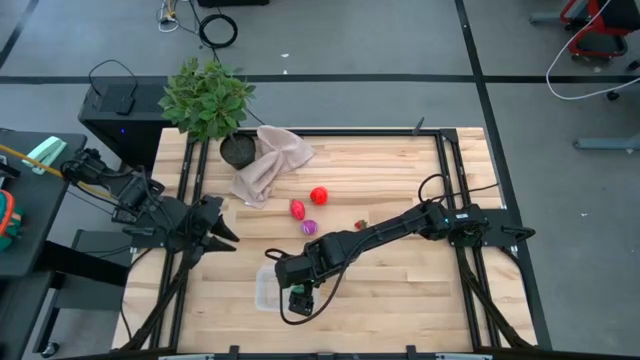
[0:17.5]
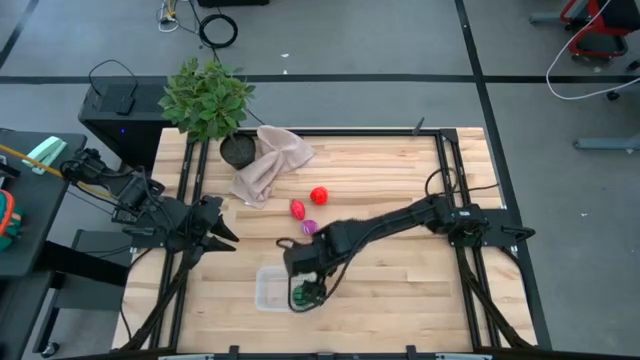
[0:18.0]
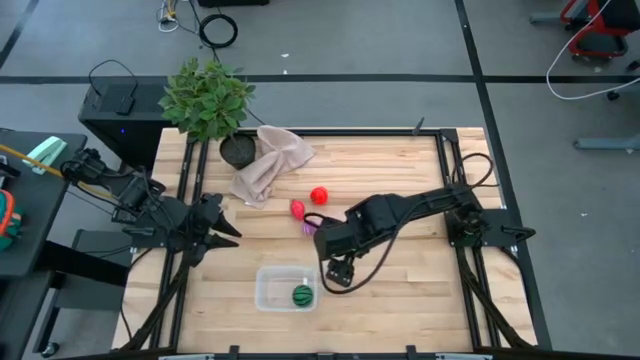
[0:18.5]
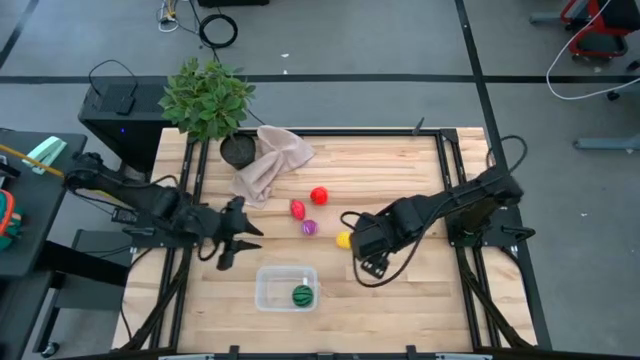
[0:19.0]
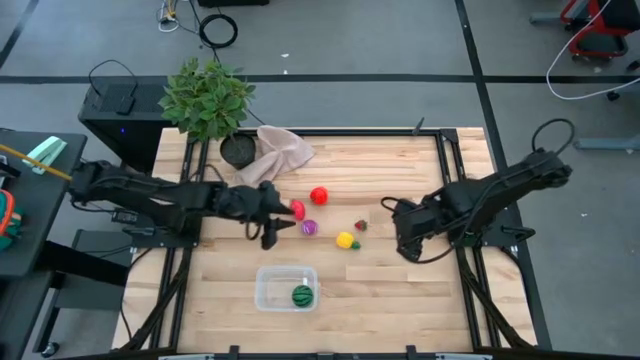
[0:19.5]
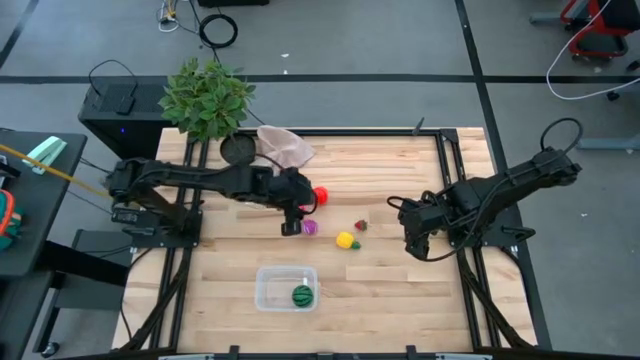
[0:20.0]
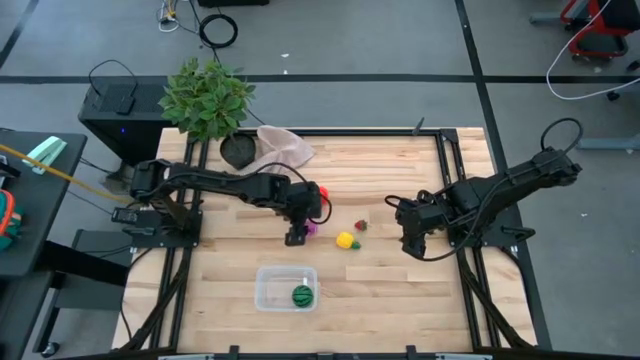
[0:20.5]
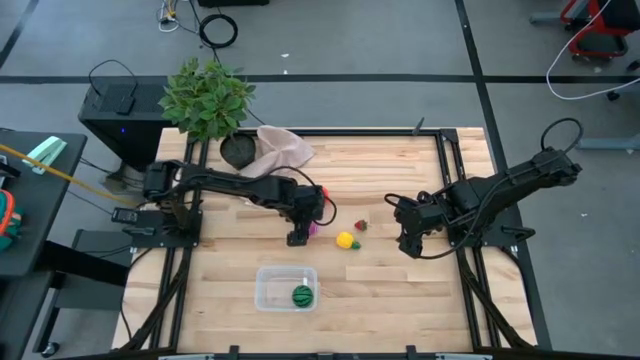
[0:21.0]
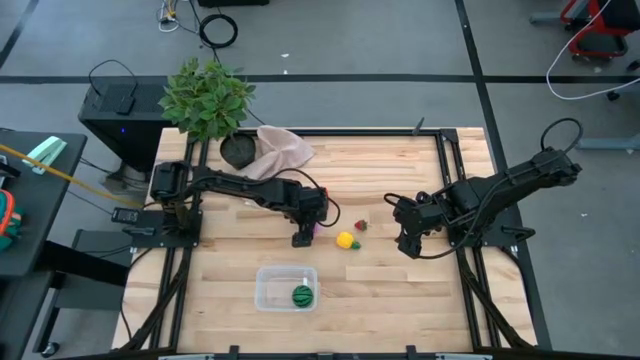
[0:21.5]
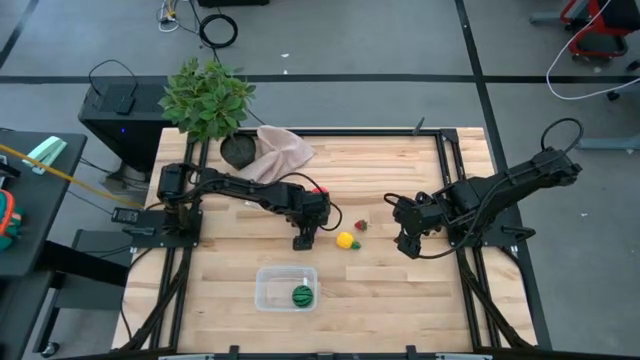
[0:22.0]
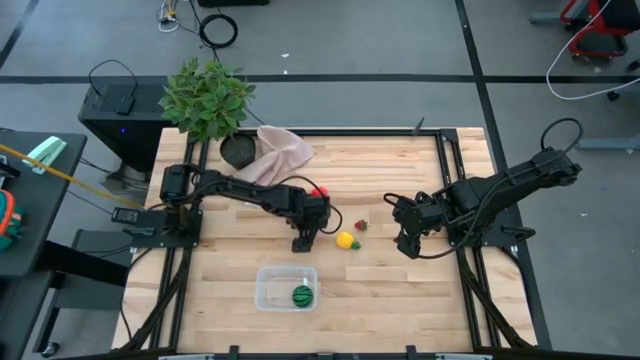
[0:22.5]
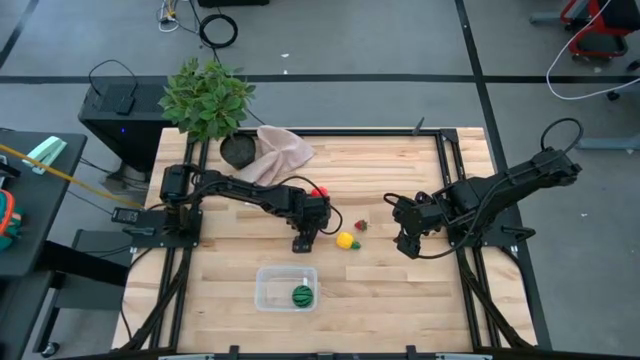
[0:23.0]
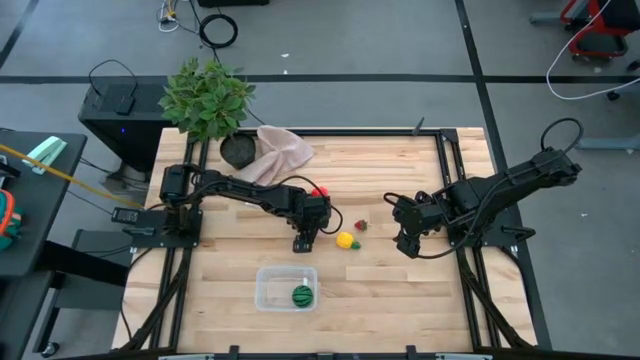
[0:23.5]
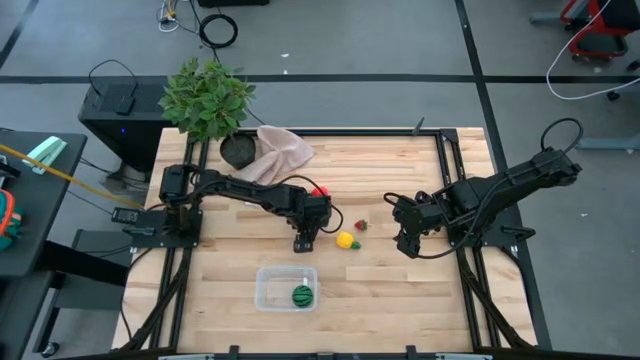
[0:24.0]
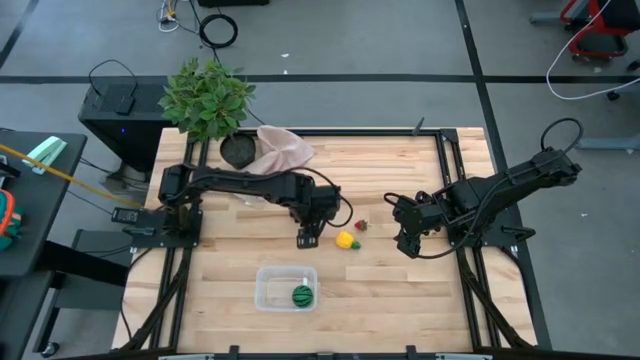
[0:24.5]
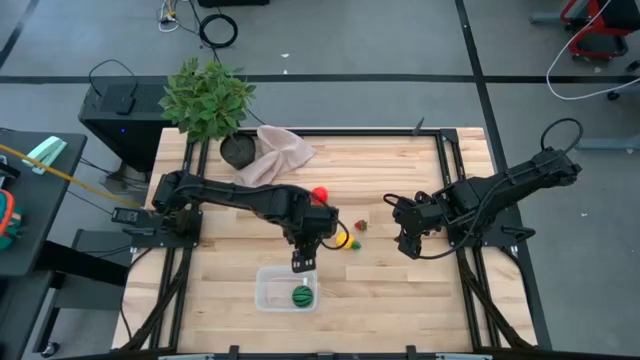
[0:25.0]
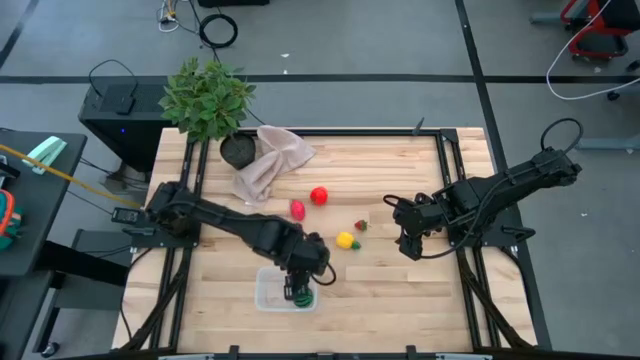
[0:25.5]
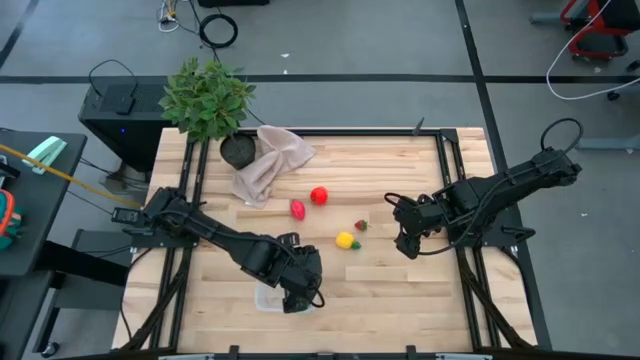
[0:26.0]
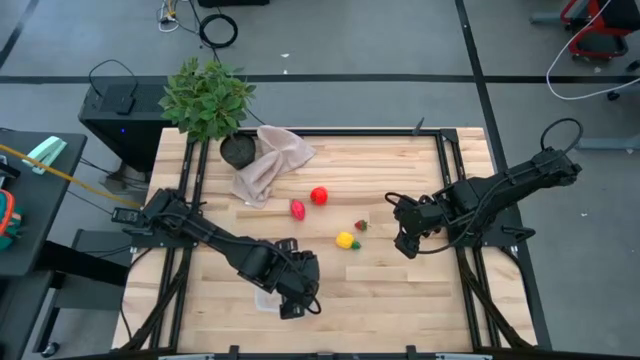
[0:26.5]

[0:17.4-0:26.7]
Task: Pick and placing Produce into tupperware
Put the onion into the transparent bin

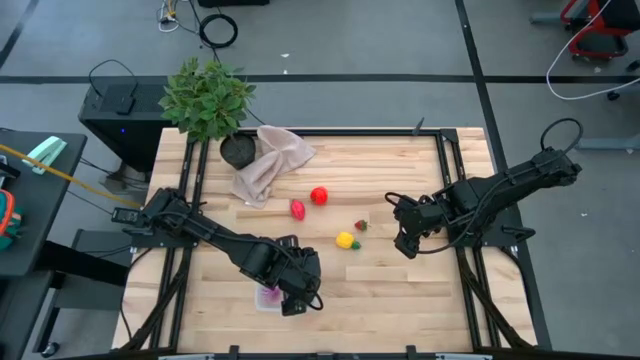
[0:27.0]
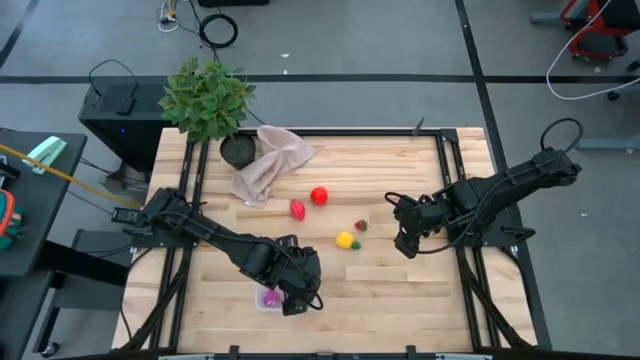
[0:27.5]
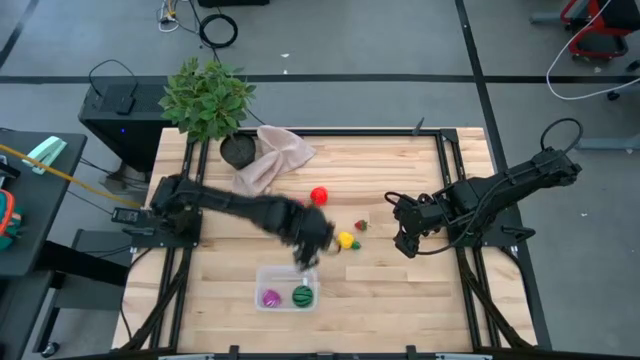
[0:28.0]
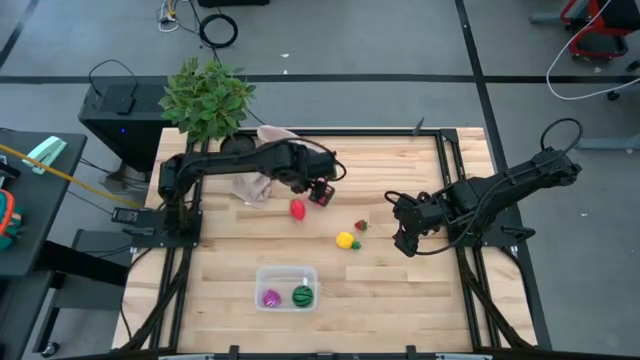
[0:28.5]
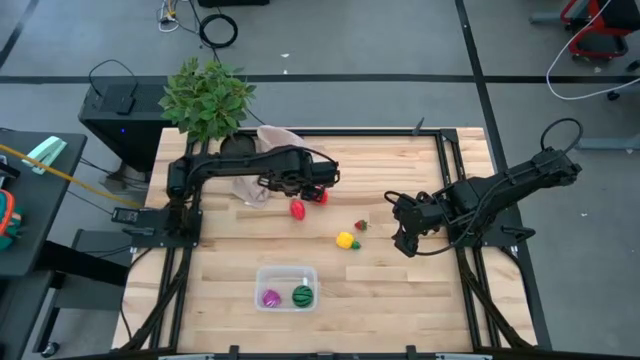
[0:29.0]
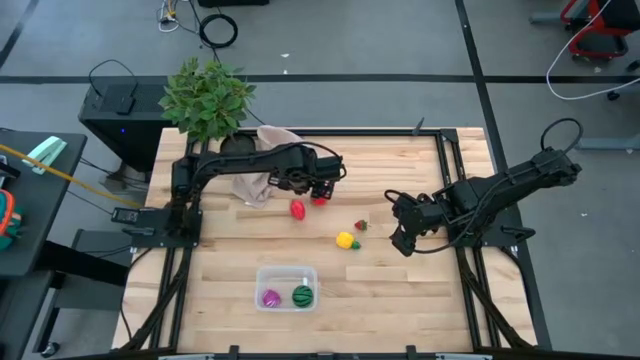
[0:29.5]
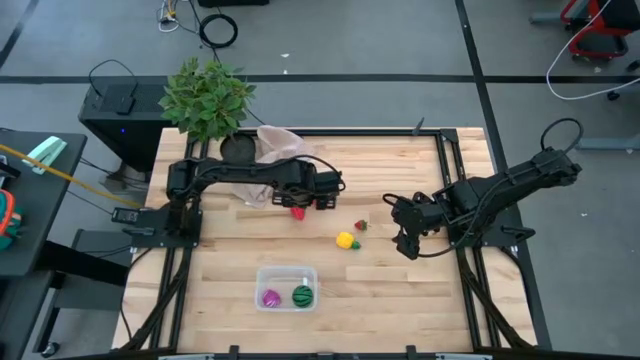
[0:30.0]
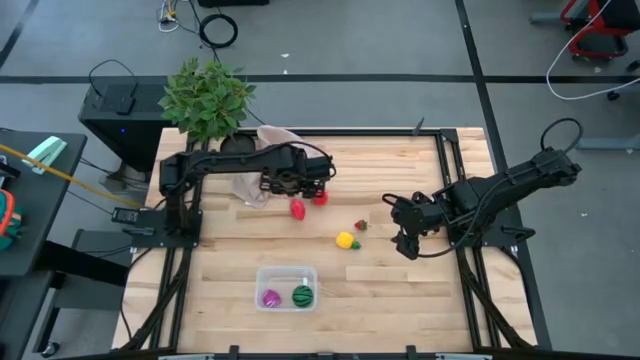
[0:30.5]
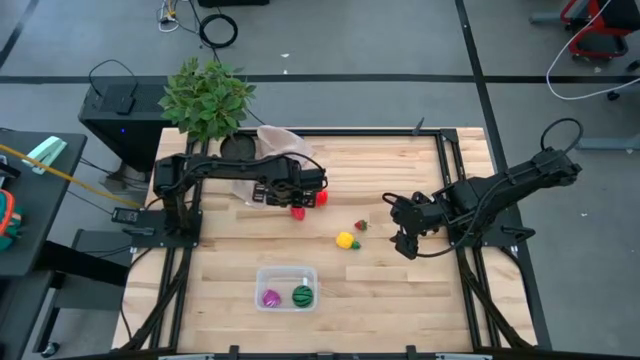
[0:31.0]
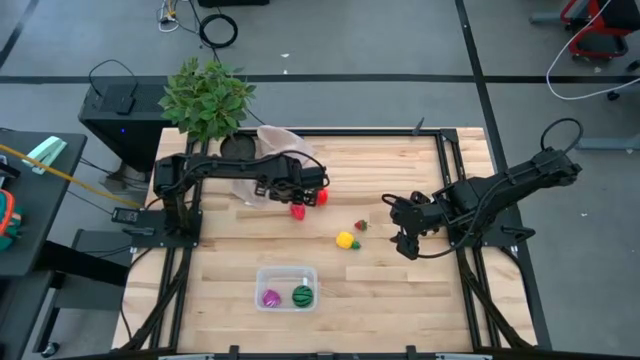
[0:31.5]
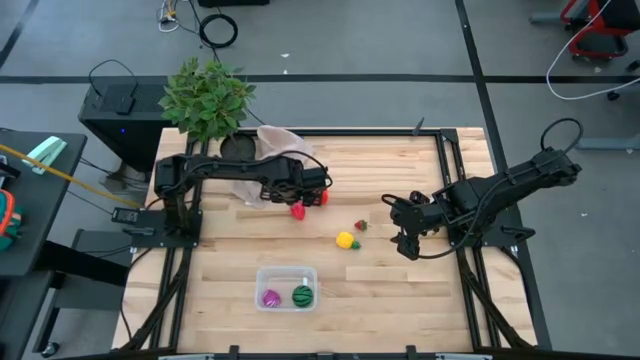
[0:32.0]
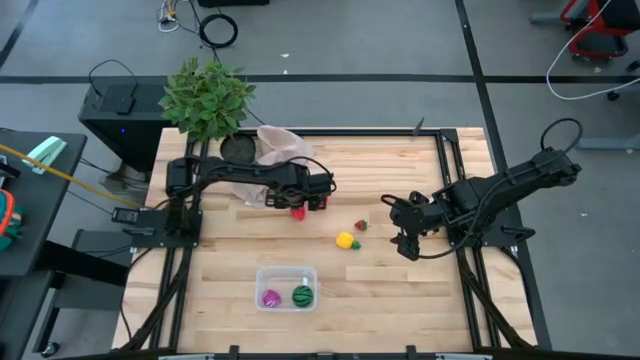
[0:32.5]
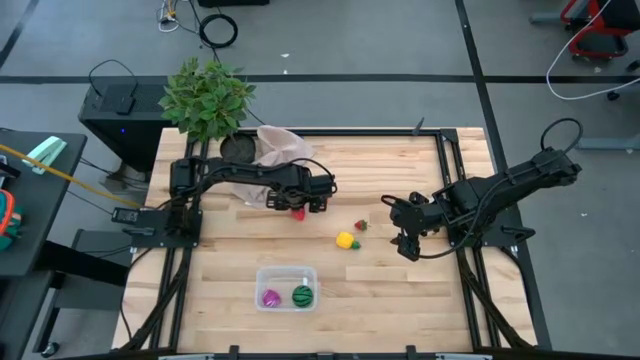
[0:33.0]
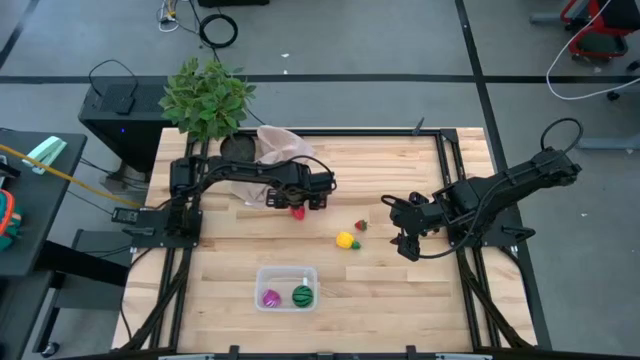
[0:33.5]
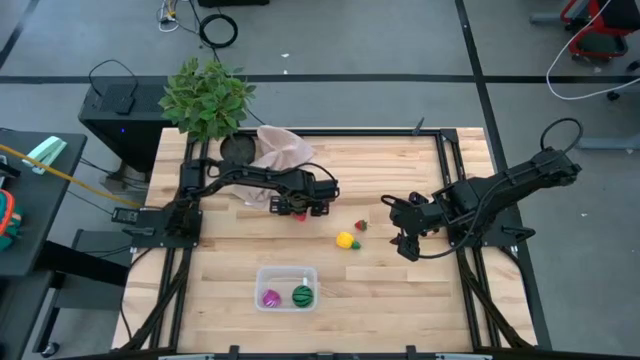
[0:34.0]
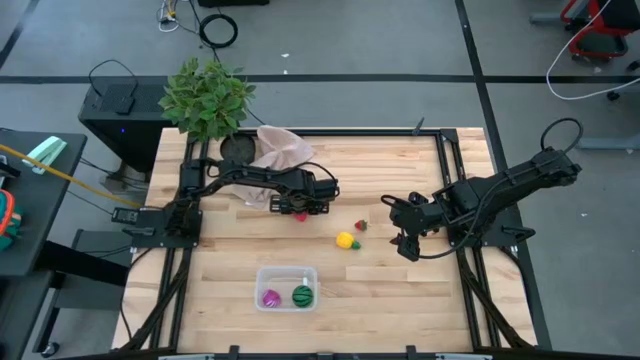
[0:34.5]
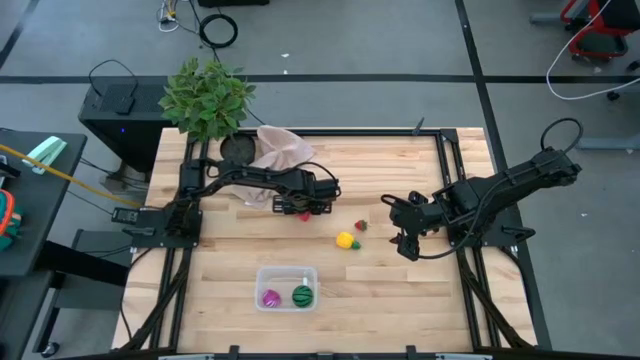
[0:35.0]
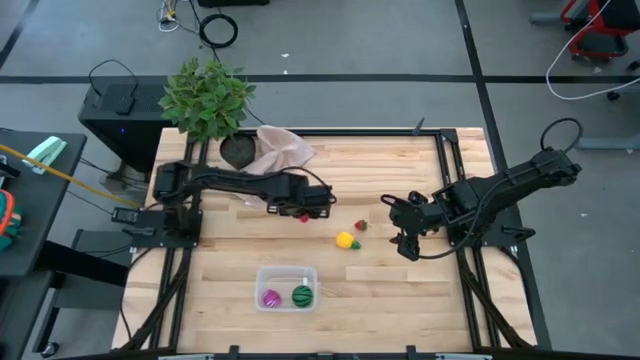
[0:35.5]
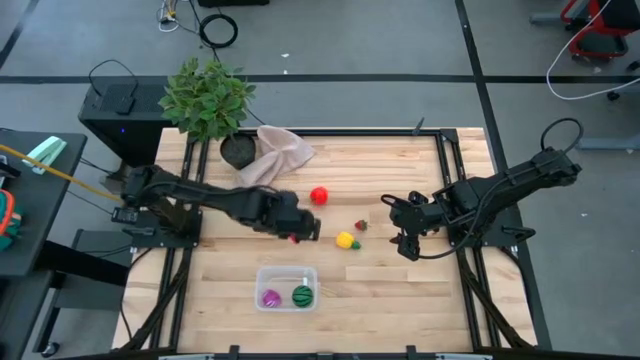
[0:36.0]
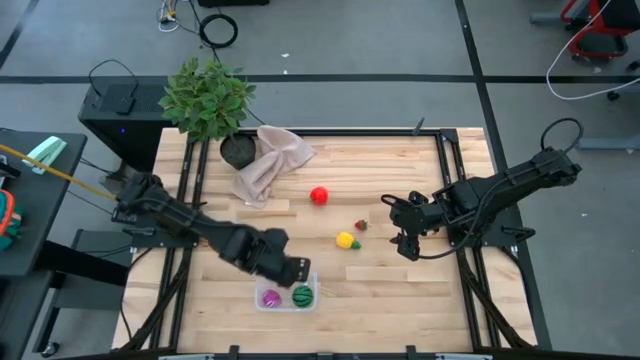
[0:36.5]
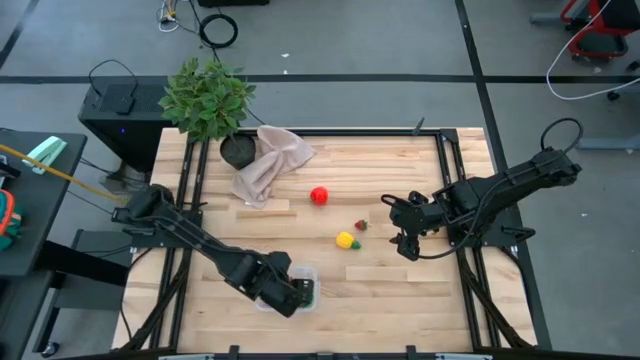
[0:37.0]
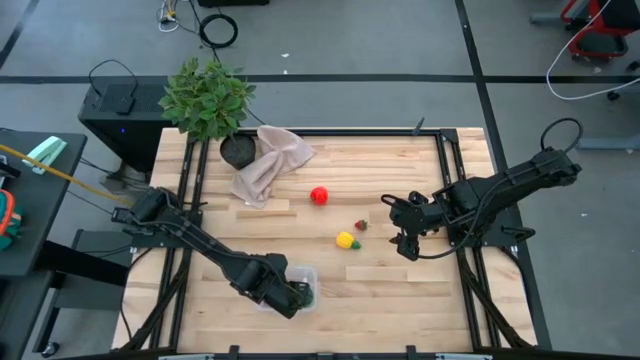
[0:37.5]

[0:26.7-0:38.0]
Put the dragon fruit into the transparent bin
